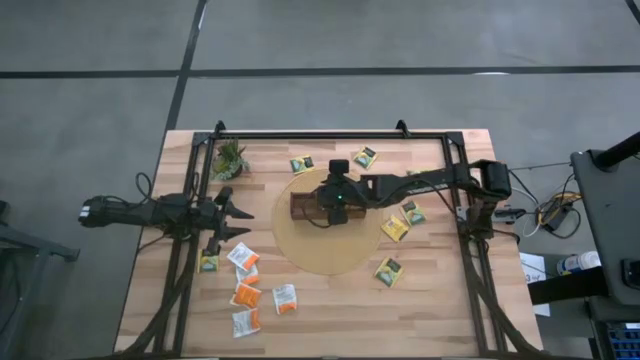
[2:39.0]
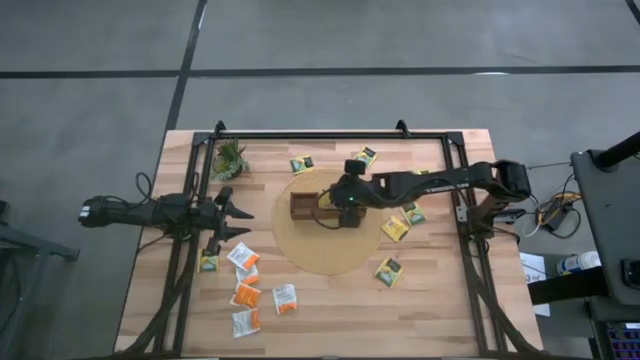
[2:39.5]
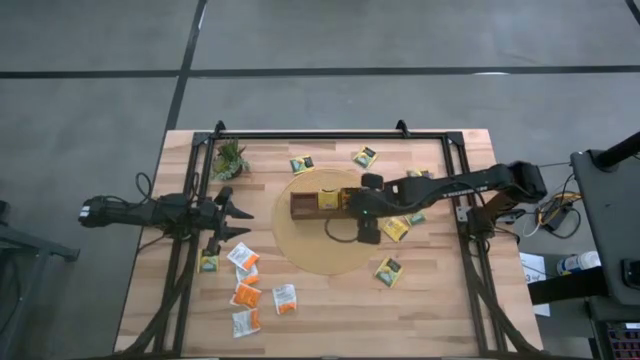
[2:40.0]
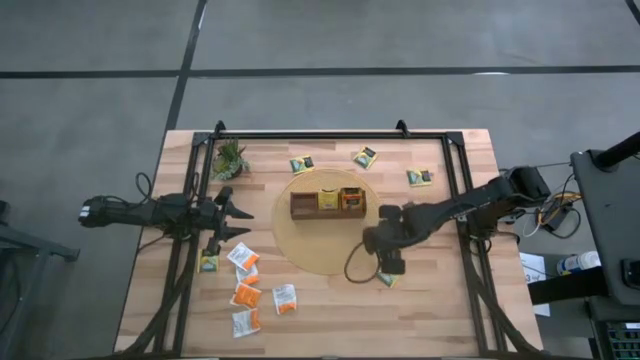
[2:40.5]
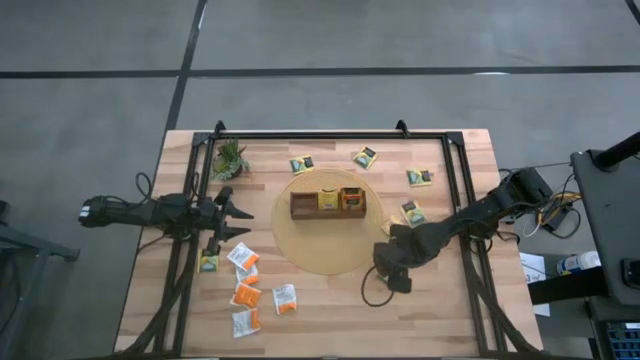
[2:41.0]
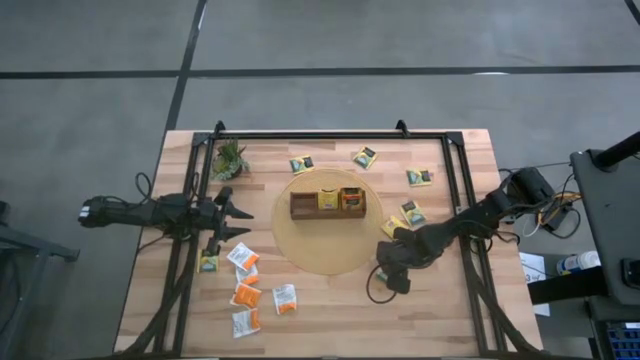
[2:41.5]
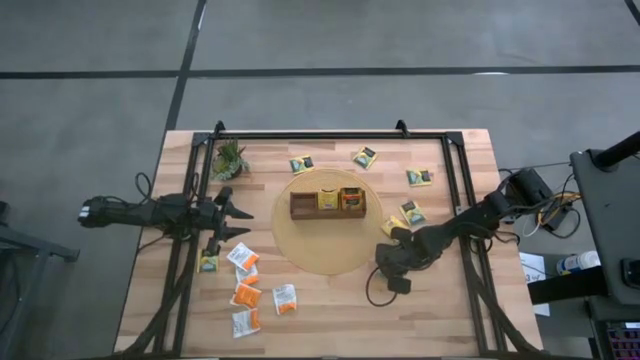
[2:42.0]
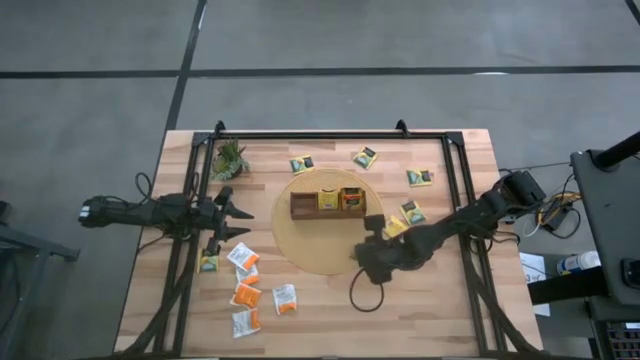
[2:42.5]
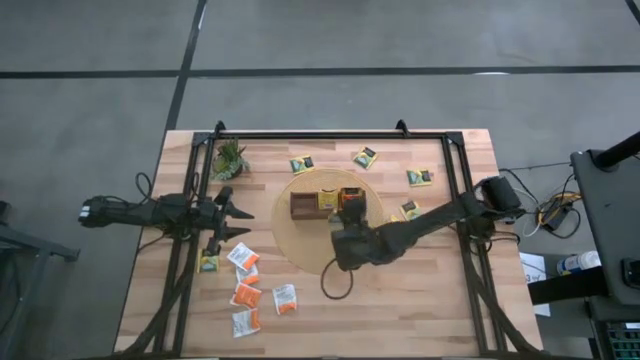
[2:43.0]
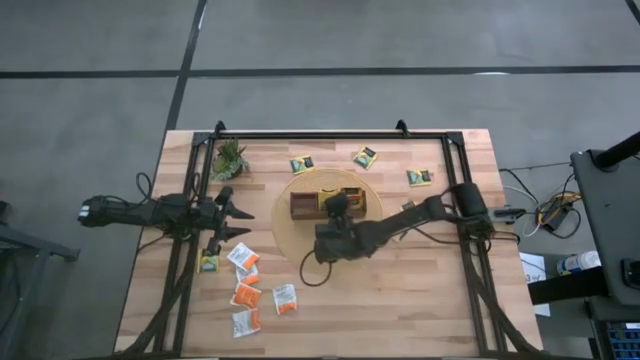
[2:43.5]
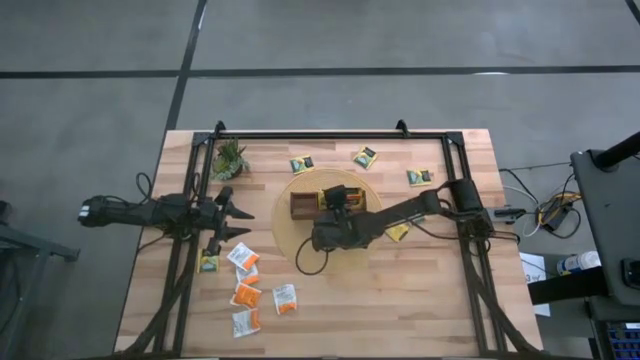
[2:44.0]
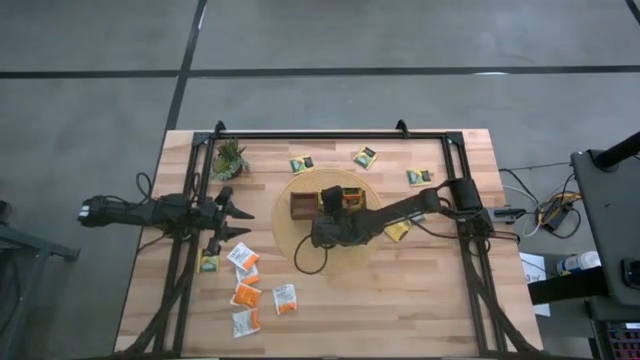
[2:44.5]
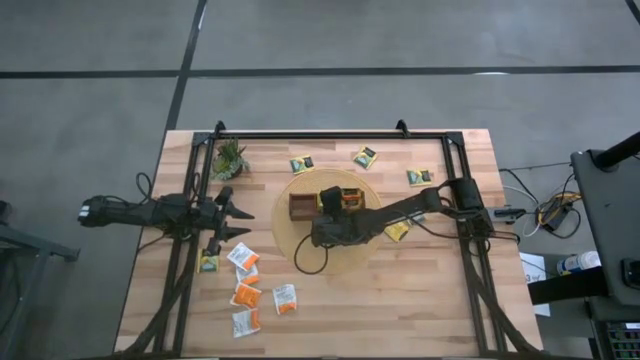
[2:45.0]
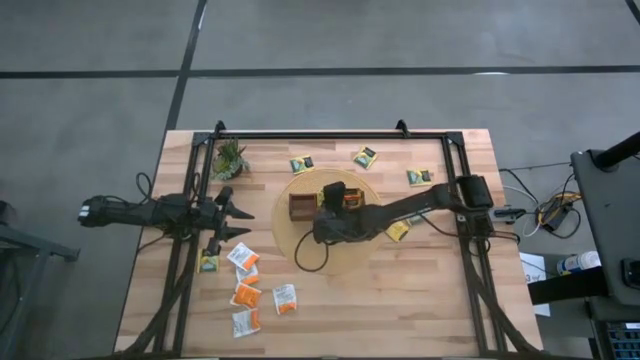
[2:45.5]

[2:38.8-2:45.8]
Task: Pick & Place Tea
Put the yellow tea bag into the middle section of the wooden organizer

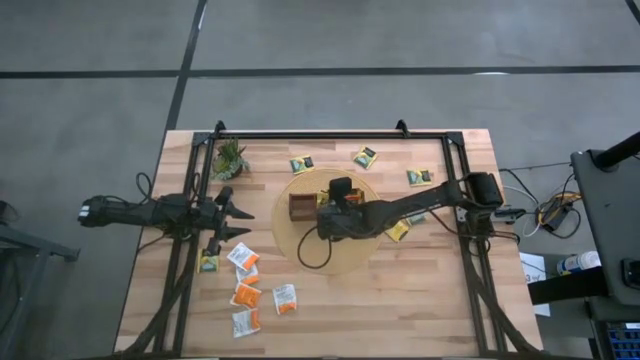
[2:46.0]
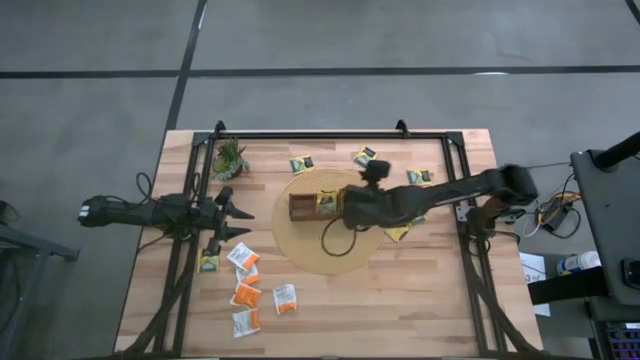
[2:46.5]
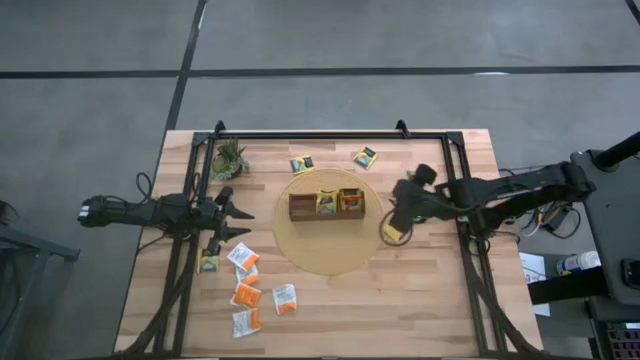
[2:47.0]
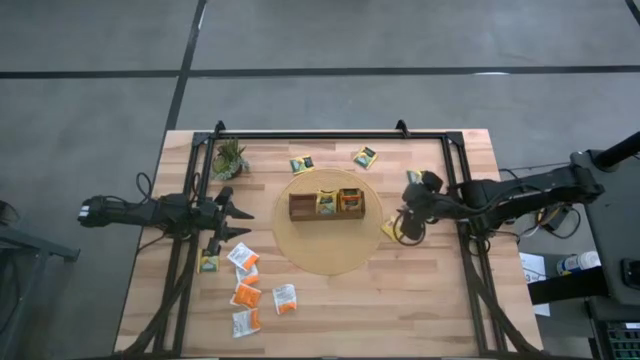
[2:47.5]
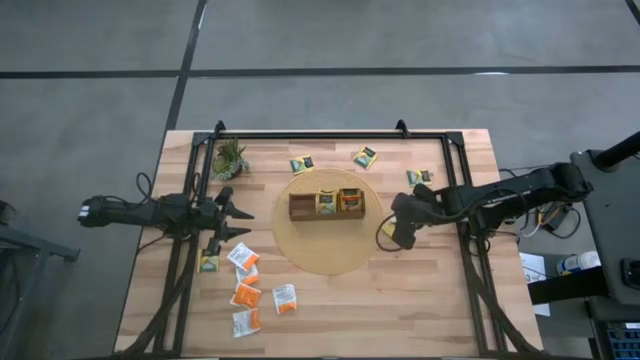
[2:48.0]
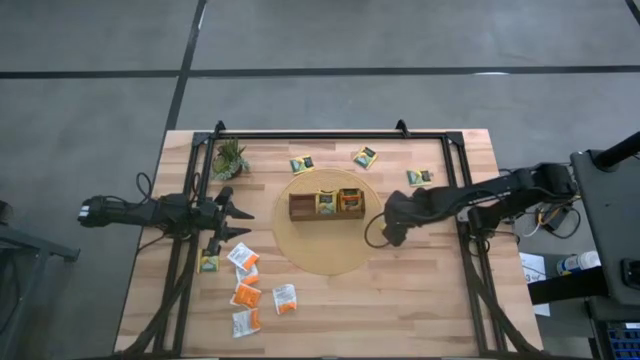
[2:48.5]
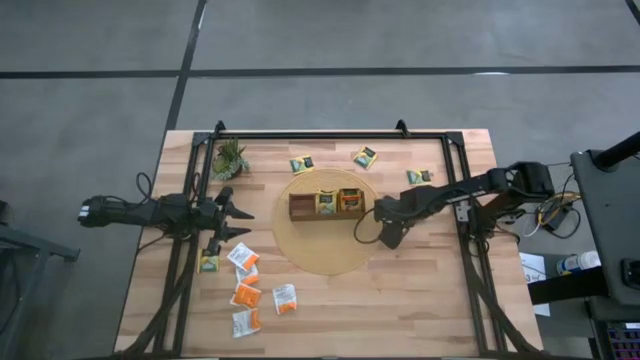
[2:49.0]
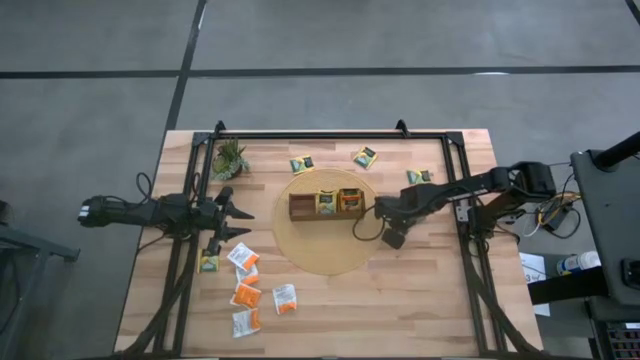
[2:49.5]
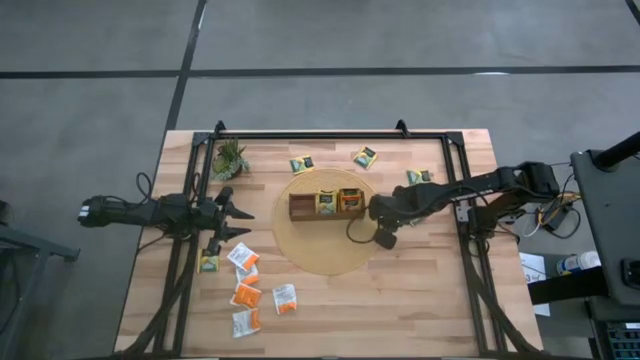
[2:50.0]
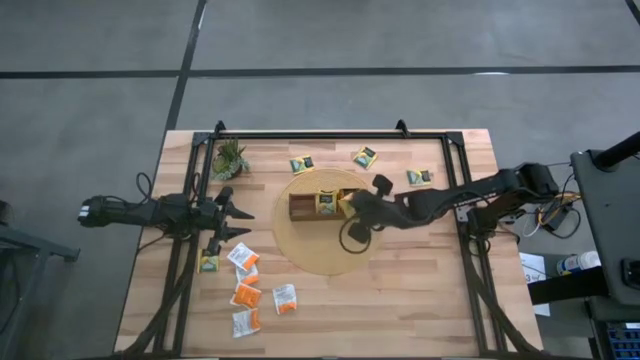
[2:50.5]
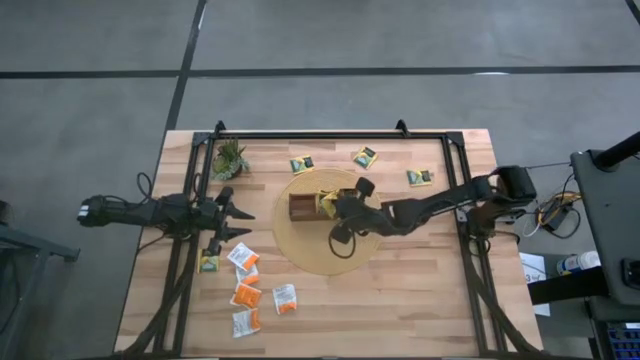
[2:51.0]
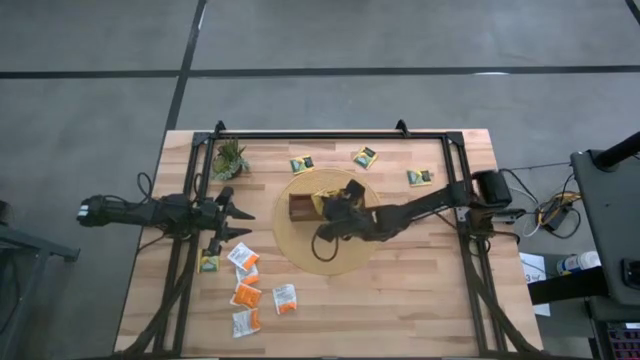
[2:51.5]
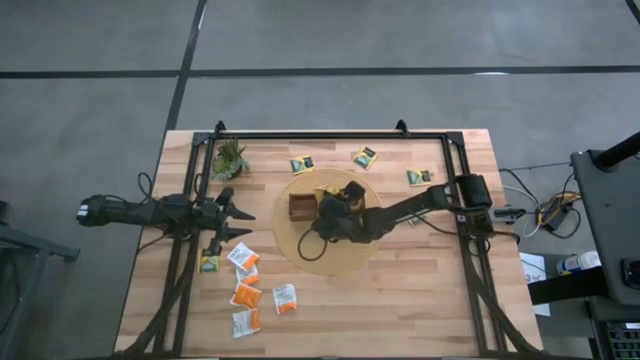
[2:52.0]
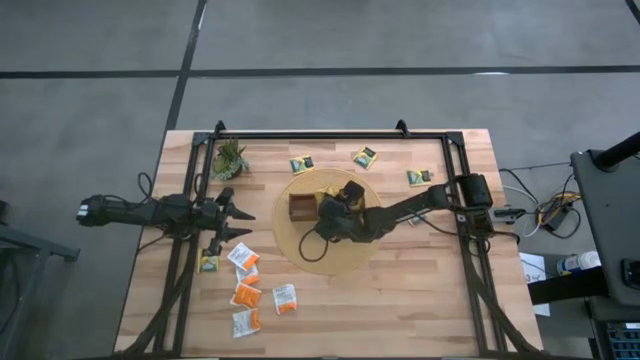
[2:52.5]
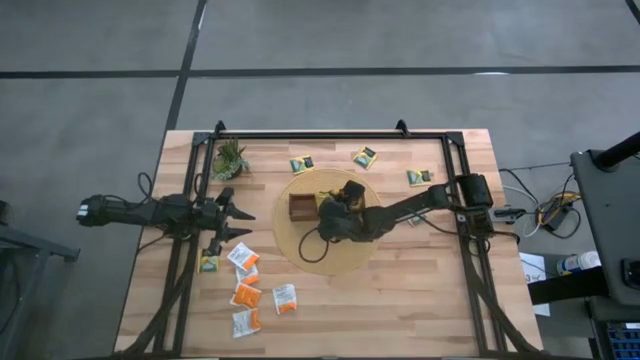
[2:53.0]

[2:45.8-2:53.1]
Put the yellow tea bag into the middle section of the wooden organizer

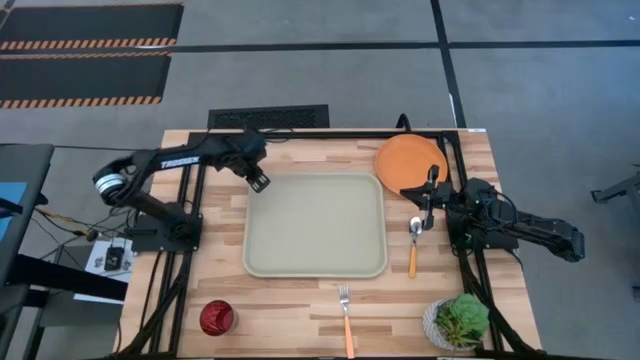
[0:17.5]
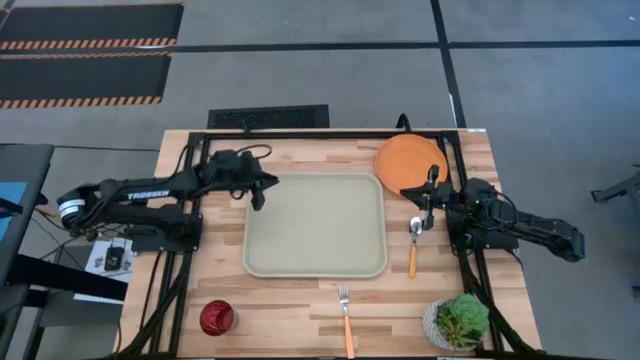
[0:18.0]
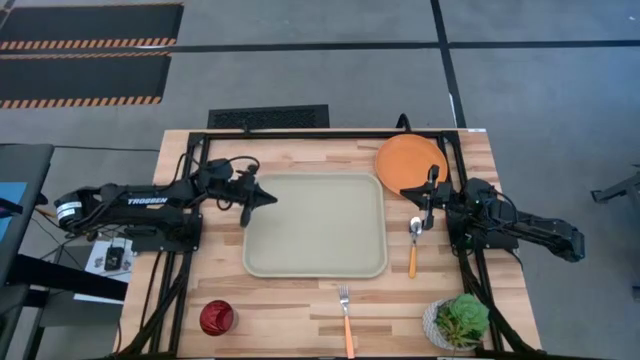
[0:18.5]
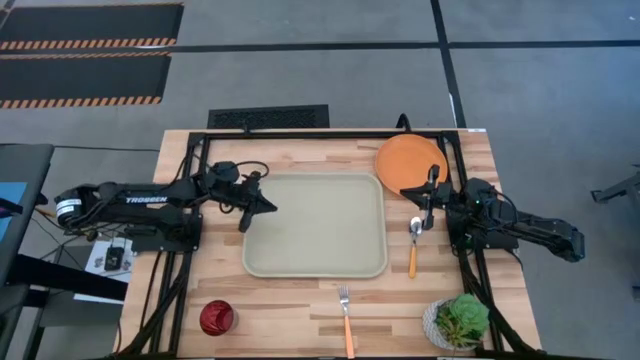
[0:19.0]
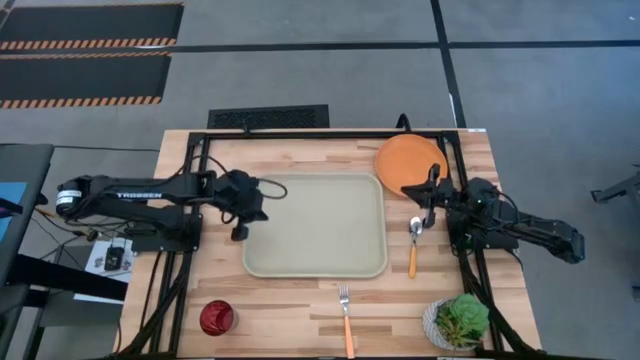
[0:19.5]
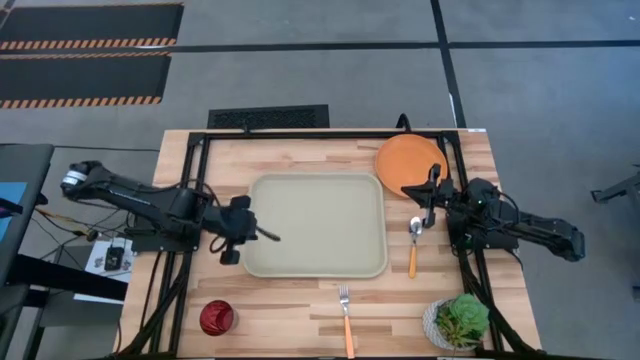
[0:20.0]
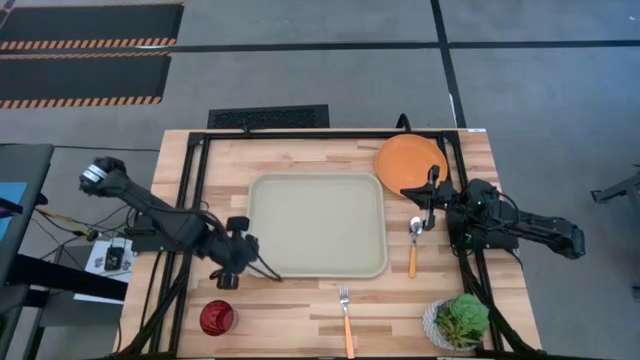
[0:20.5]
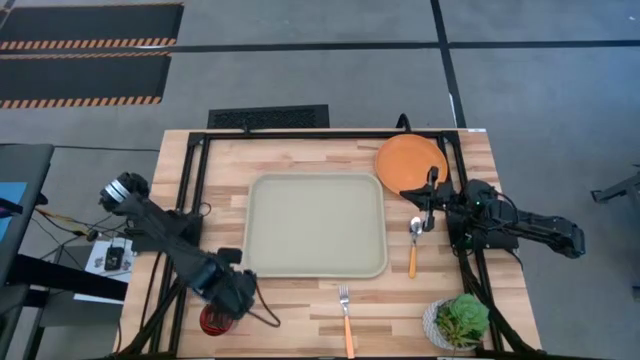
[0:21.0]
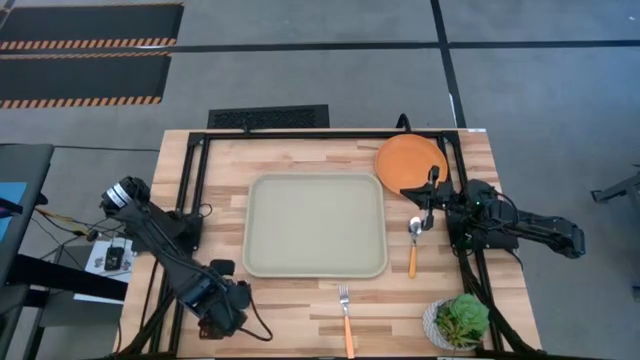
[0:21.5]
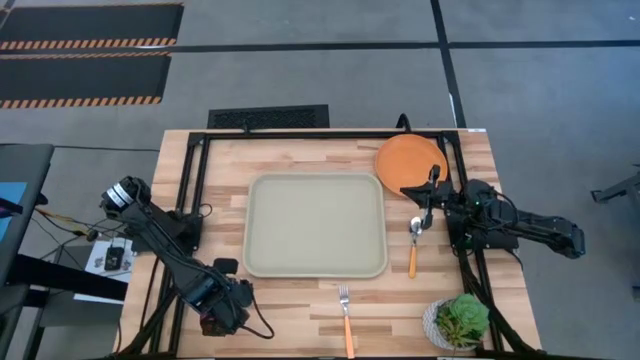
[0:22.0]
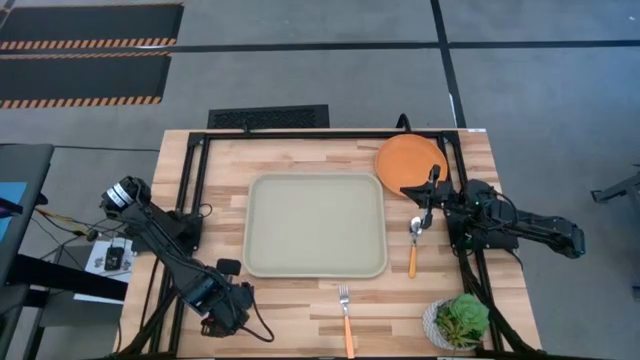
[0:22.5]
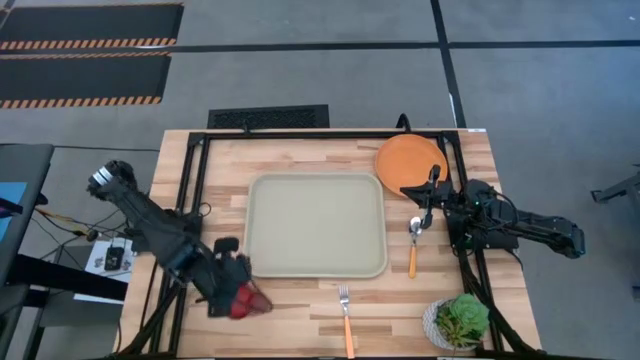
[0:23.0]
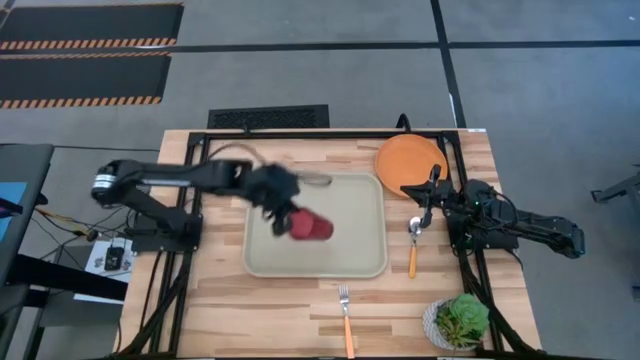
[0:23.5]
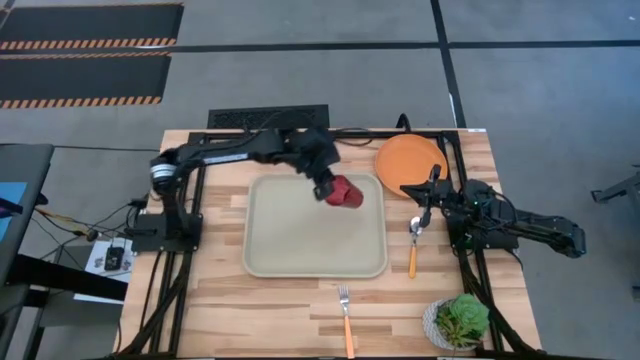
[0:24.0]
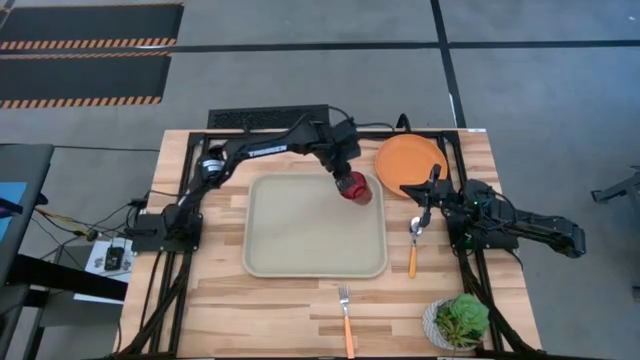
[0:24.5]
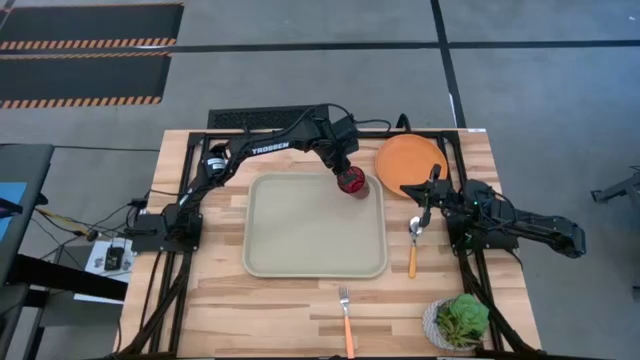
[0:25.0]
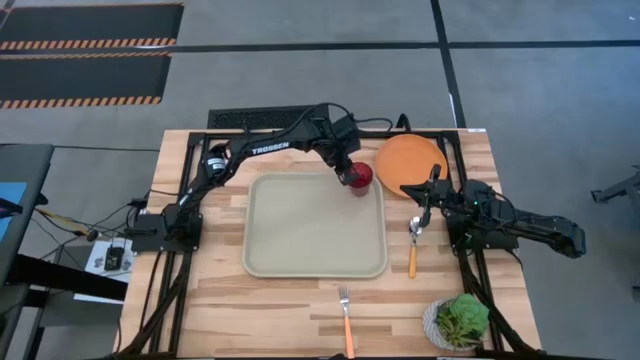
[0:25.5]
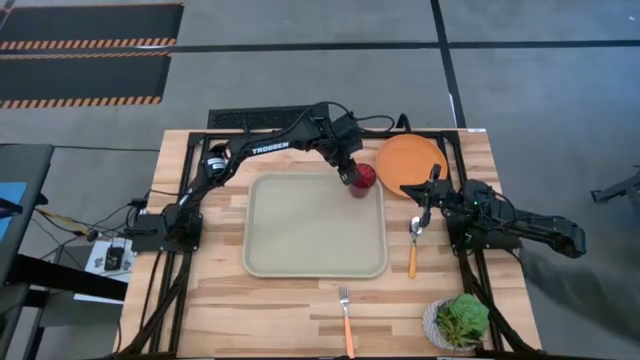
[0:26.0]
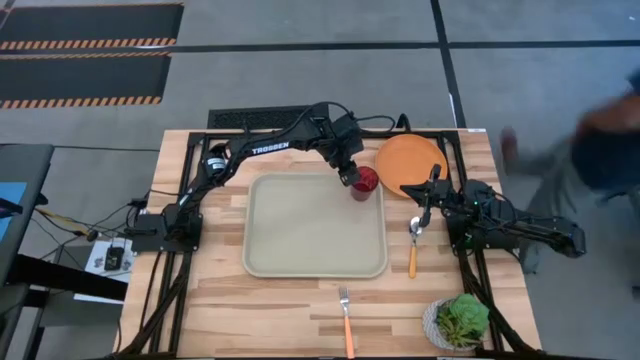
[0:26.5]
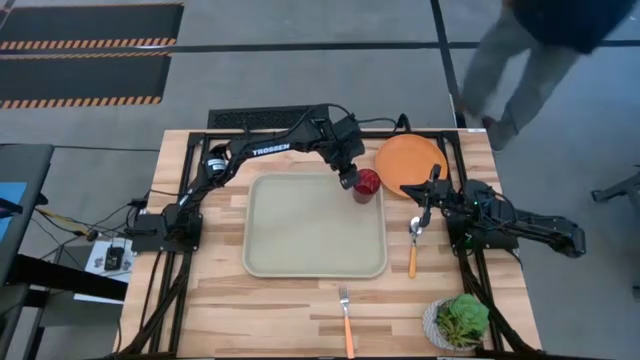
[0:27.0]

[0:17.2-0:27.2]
Task: Pick and place plate/cup/fork/spoon on tray
Put the red cup on the gray serving tray
